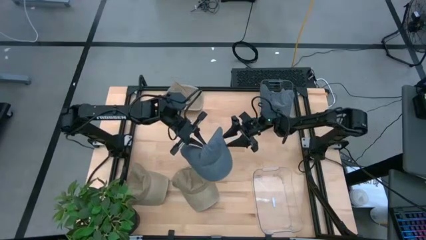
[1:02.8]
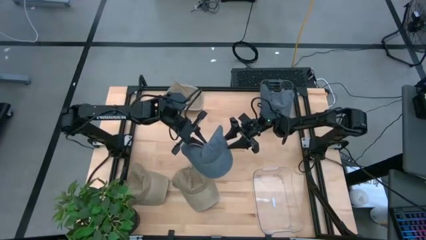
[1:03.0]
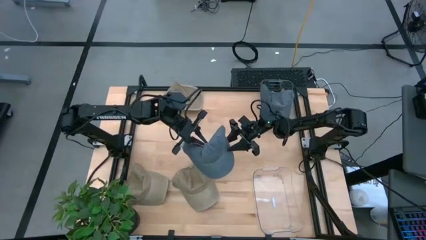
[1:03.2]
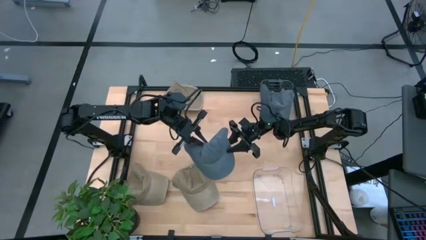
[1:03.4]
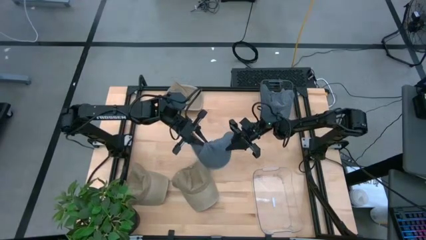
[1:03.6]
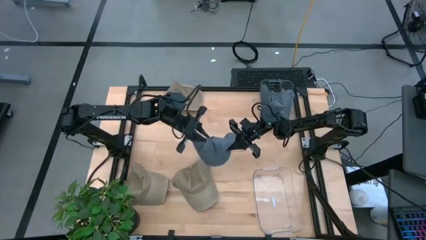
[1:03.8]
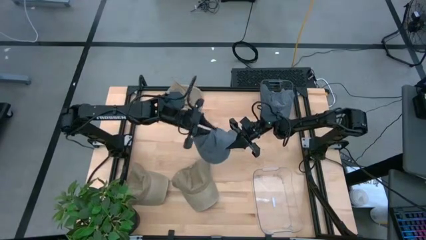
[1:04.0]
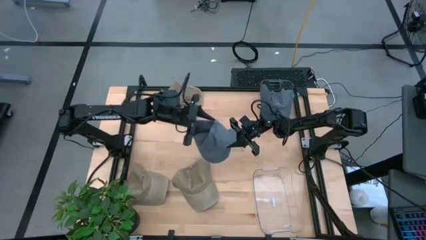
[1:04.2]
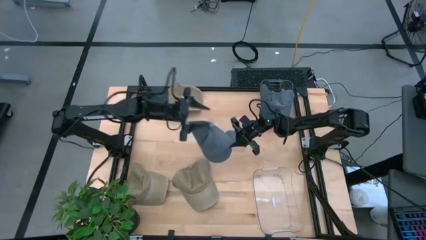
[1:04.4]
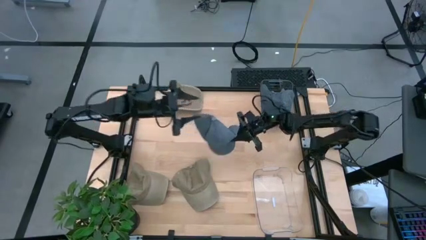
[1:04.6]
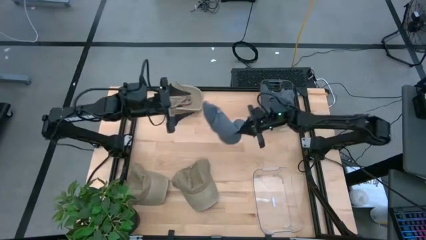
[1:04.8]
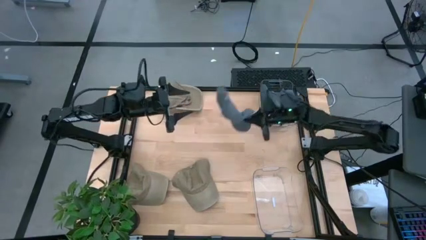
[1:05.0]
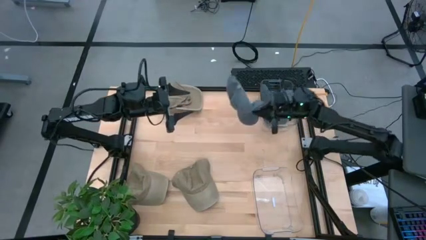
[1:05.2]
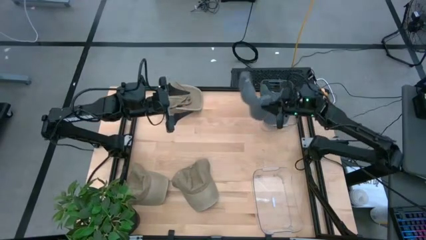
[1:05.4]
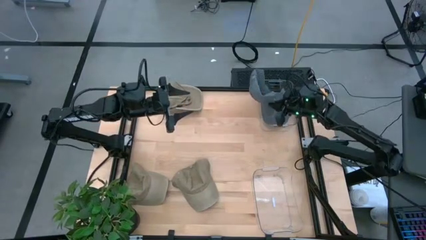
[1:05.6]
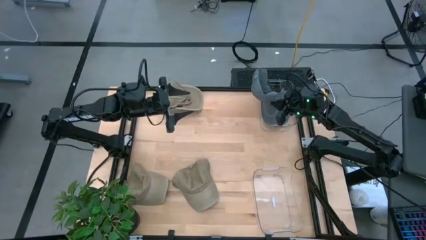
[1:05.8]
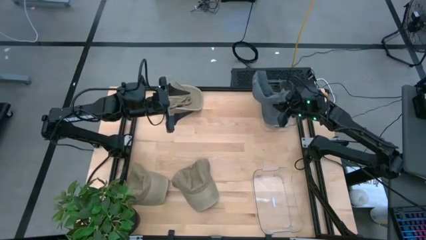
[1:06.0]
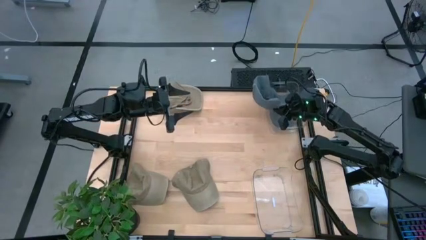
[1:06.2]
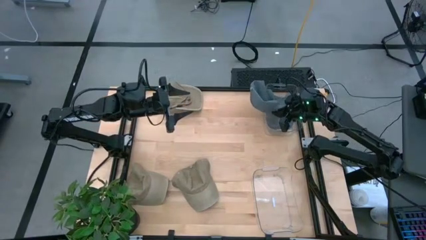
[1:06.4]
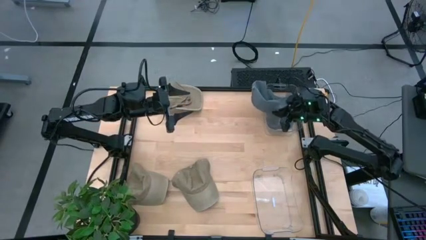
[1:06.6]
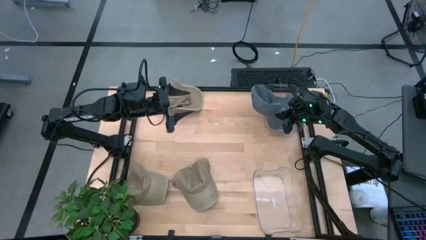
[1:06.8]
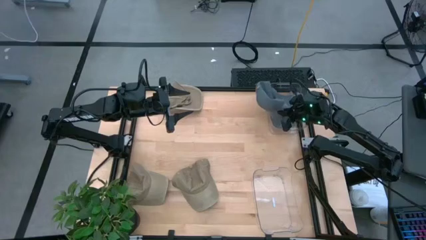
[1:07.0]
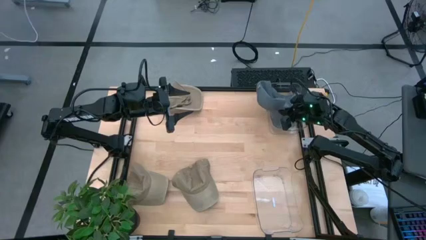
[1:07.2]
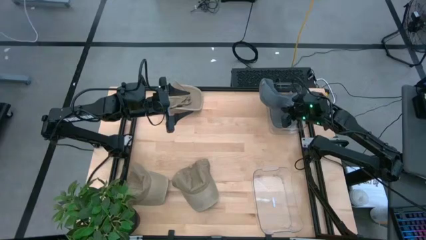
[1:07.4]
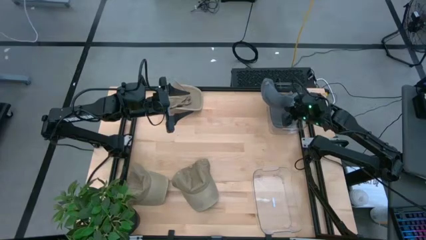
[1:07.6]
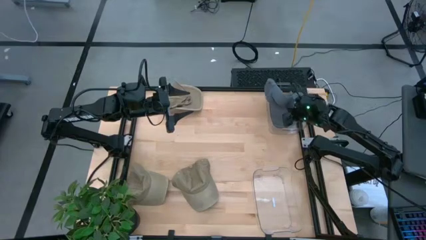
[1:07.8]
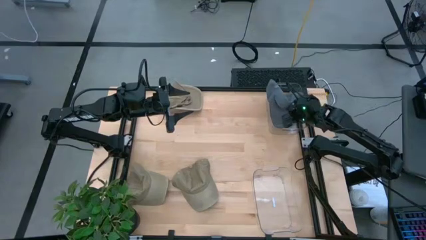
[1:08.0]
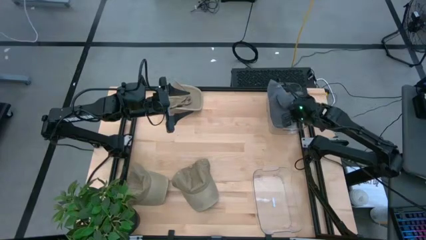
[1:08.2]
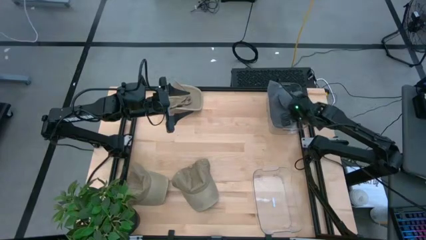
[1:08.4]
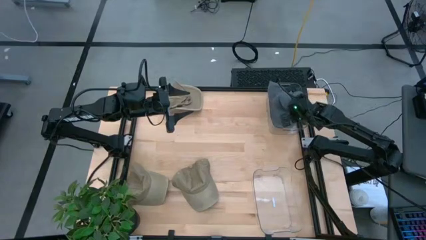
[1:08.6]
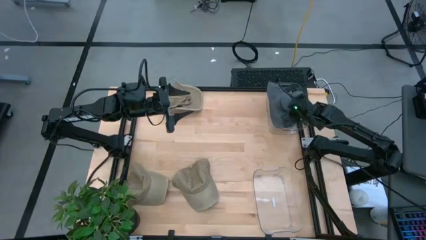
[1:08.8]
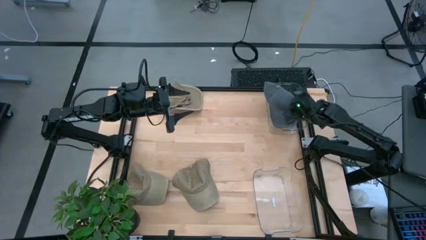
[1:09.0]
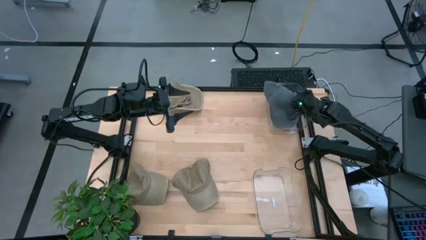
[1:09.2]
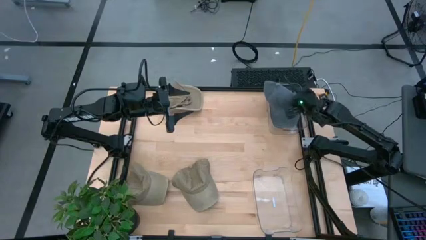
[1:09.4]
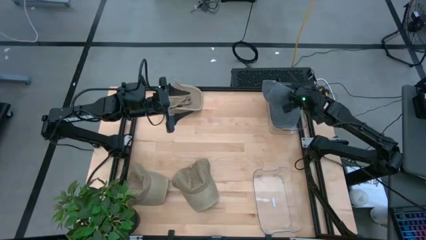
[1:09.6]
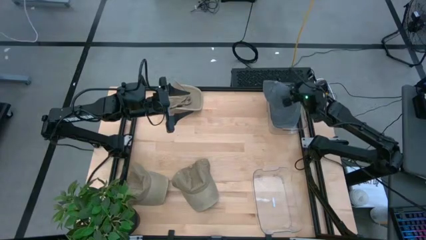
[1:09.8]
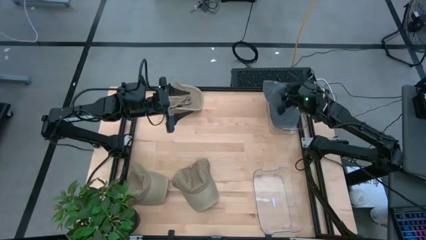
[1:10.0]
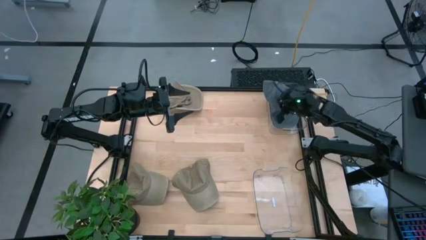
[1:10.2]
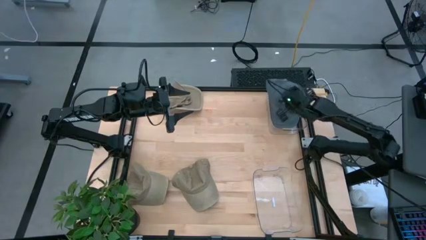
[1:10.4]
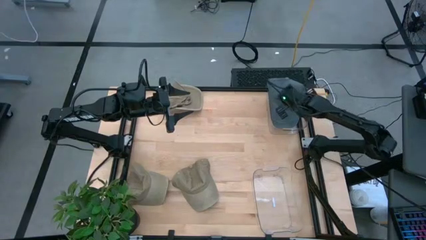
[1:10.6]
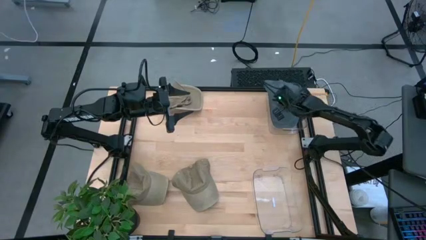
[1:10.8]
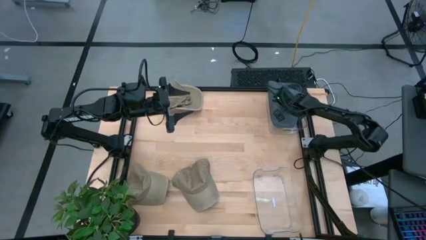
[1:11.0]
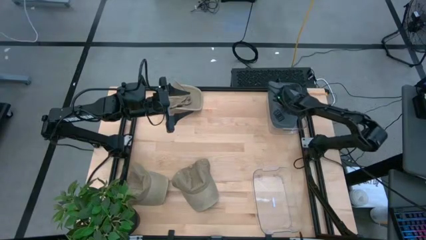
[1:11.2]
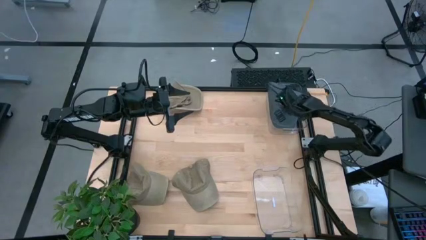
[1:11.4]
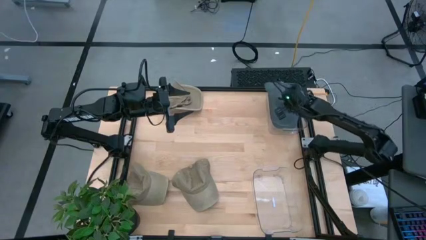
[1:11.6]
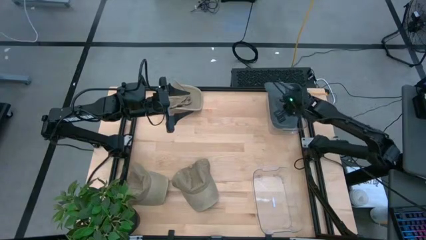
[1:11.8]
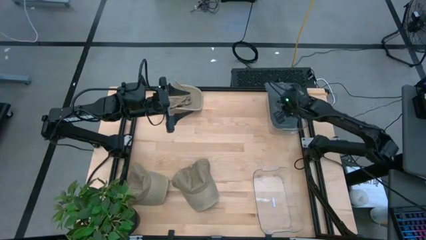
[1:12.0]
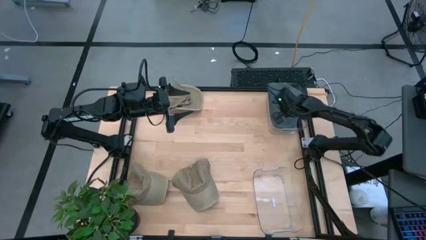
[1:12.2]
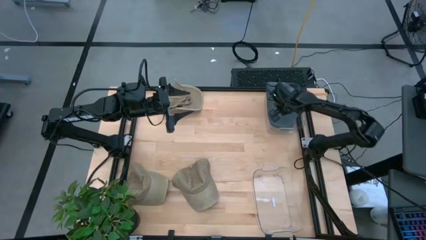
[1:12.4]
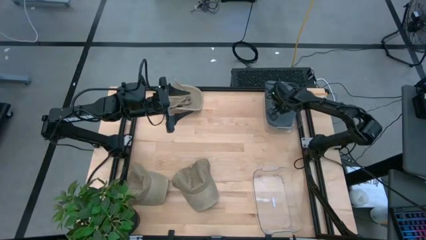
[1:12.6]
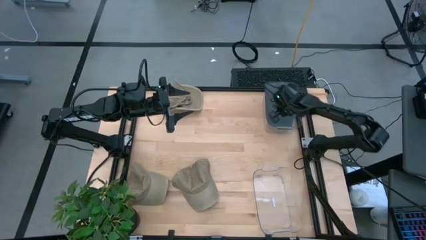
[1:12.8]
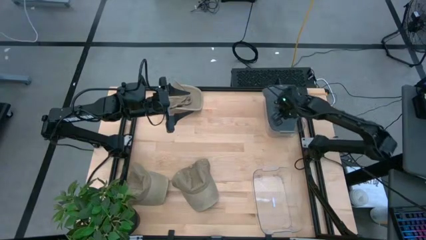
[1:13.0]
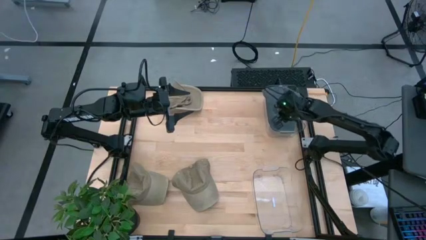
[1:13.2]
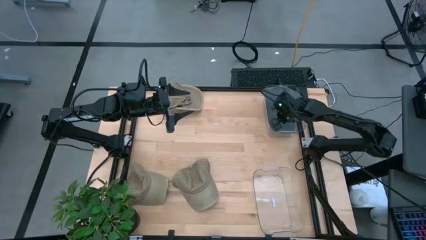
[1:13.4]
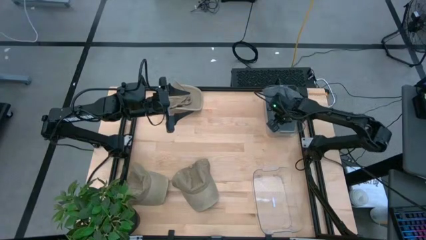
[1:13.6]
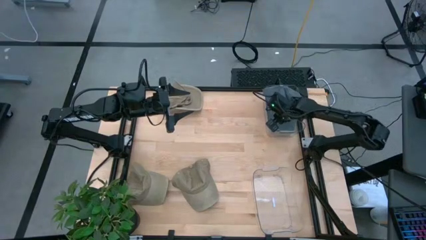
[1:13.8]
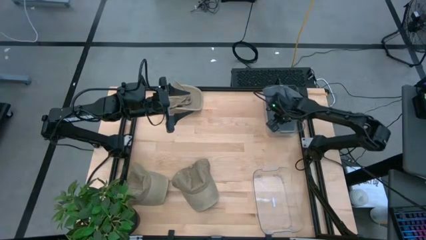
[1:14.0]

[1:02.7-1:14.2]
Task: Pick & Place hat
Put the blue cap into the top transparent bin

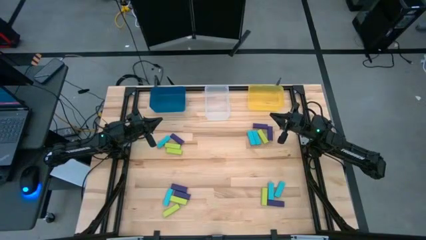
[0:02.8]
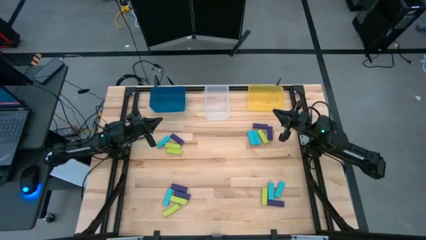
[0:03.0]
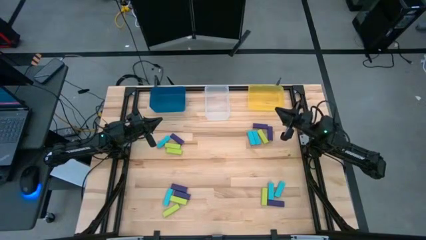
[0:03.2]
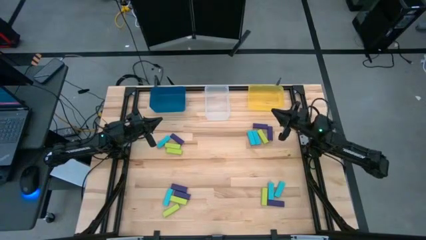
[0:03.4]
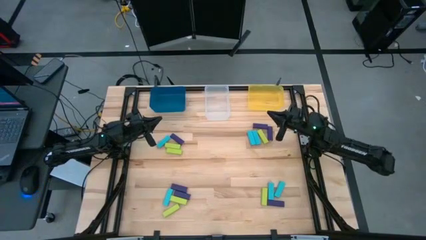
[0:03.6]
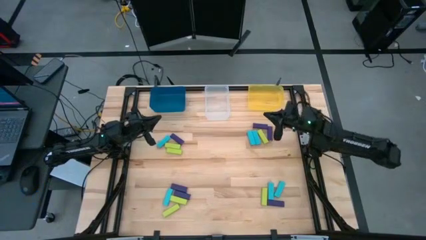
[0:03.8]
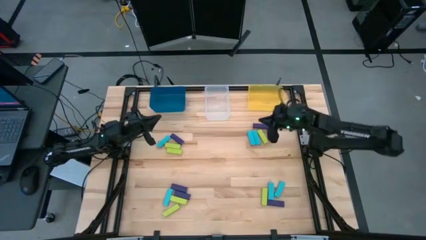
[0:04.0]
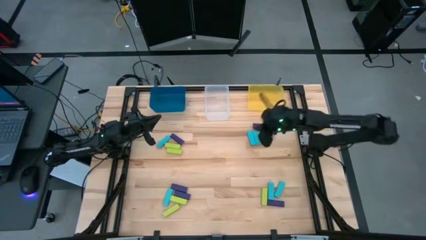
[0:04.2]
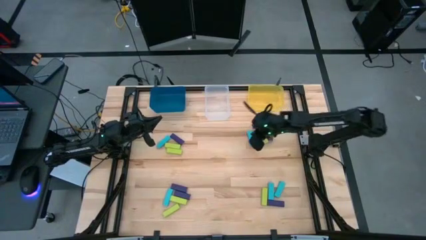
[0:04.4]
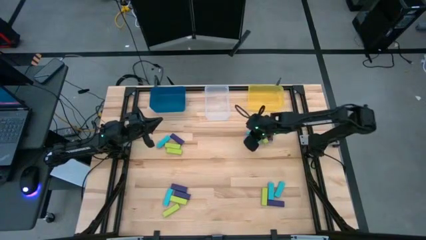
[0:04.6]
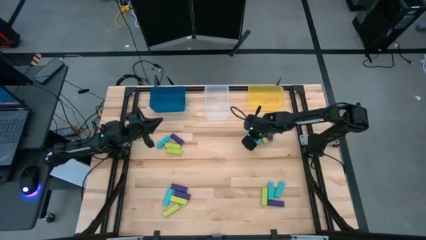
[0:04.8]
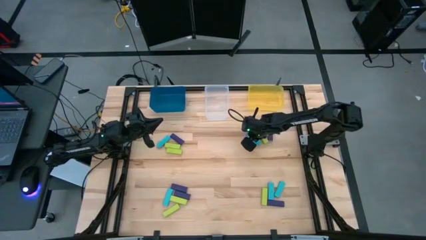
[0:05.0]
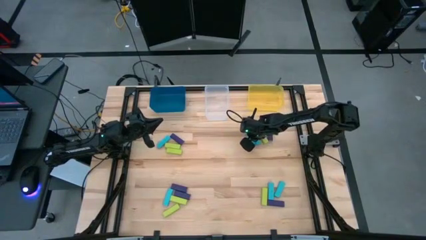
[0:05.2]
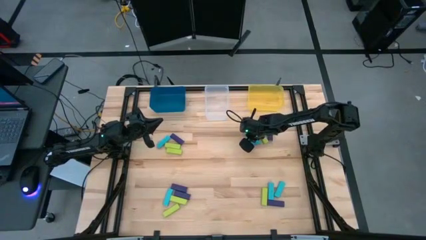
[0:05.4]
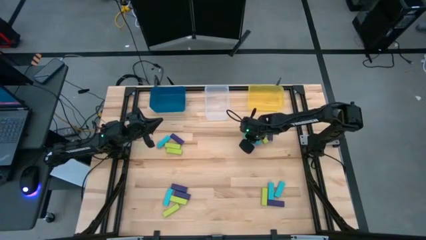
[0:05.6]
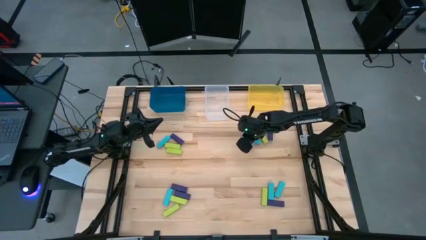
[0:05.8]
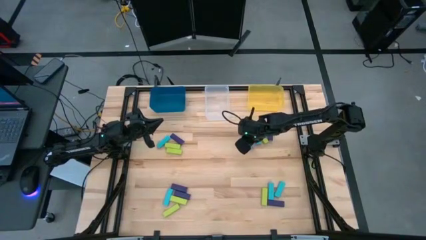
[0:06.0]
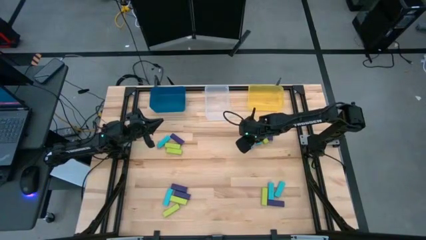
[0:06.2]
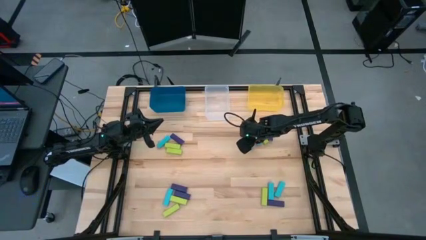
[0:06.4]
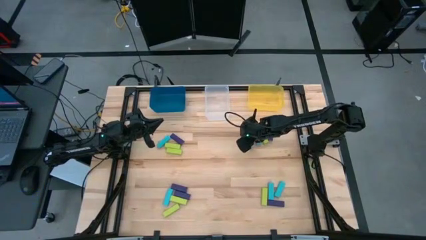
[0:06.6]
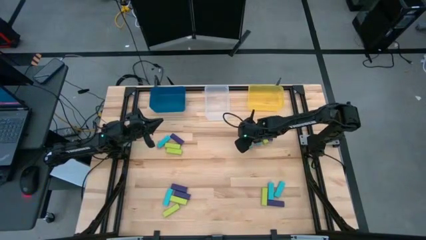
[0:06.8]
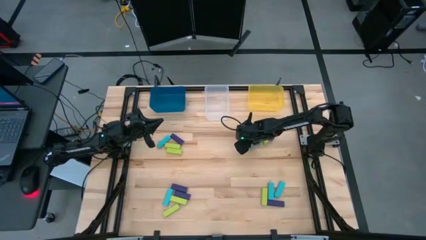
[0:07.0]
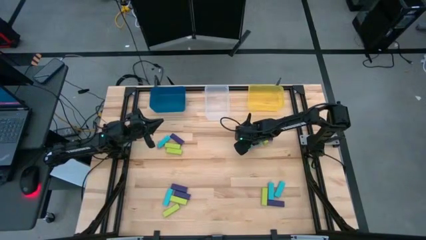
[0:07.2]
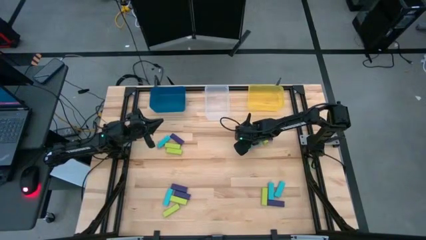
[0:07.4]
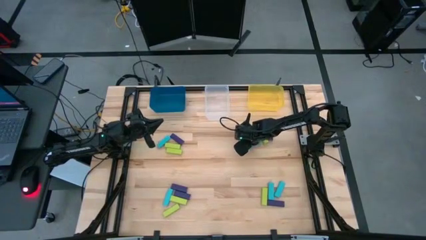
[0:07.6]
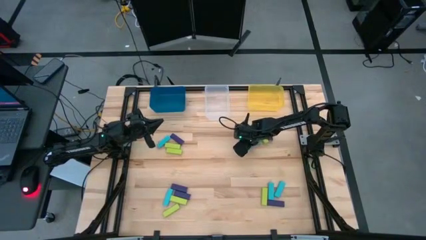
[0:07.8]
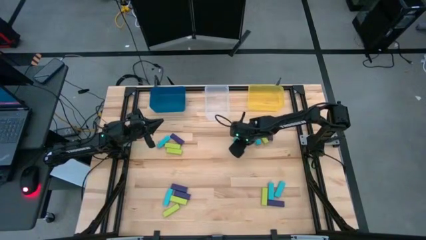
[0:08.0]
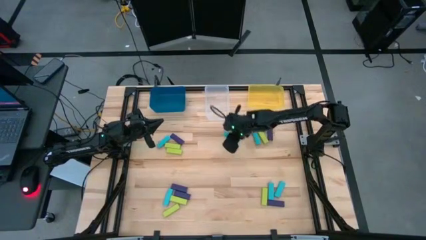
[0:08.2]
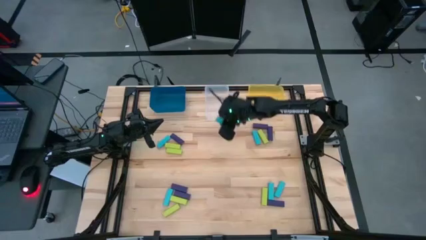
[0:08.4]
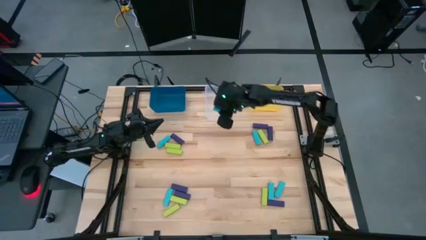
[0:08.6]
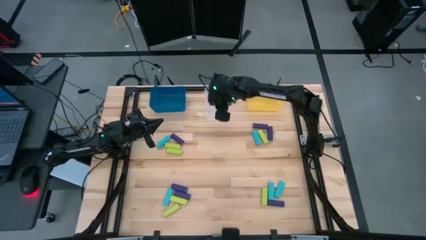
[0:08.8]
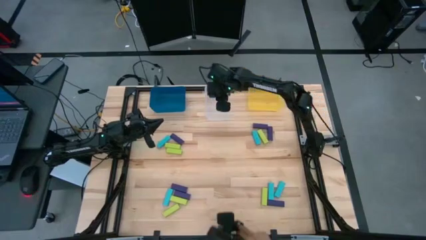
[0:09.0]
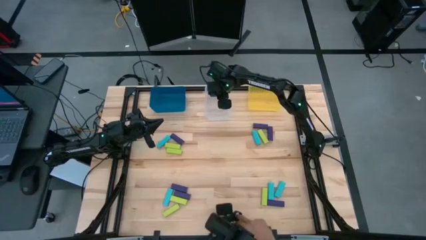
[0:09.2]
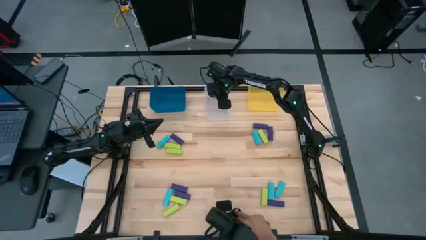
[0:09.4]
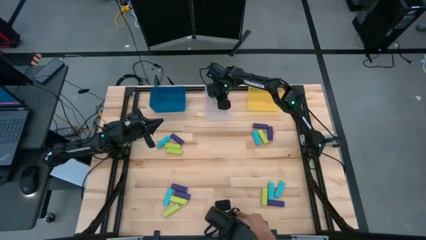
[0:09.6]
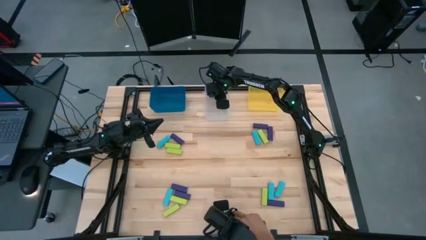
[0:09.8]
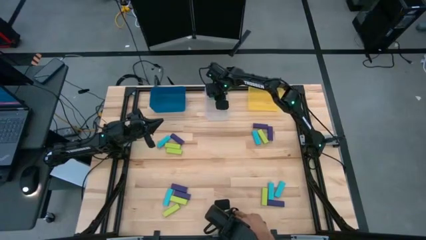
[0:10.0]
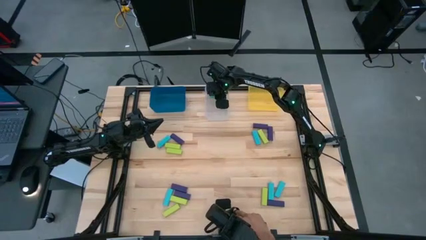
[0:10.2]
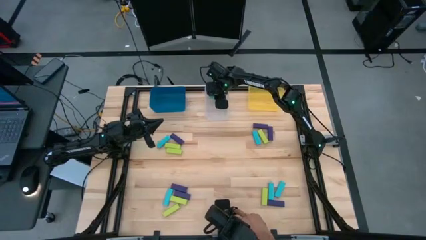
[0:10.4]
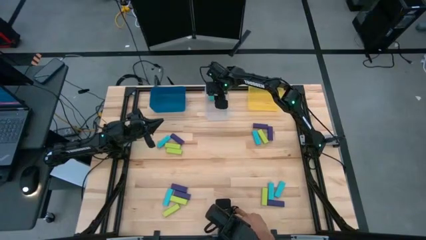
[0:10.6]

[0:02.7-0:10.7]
Task: Sort blocks
Put the blue block into the transparent bin
